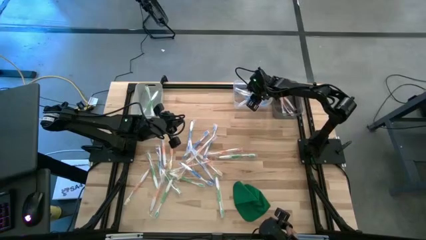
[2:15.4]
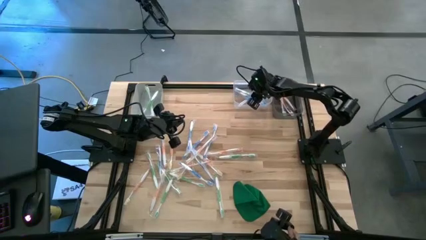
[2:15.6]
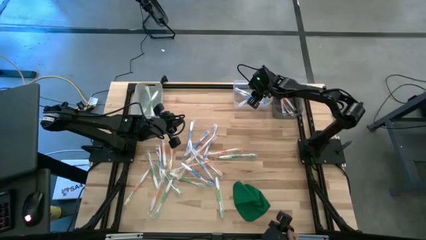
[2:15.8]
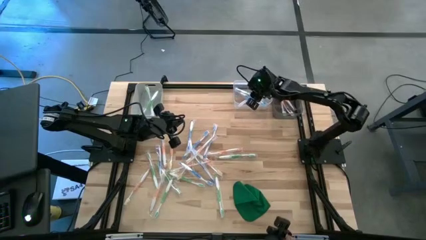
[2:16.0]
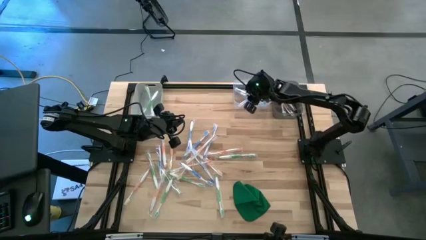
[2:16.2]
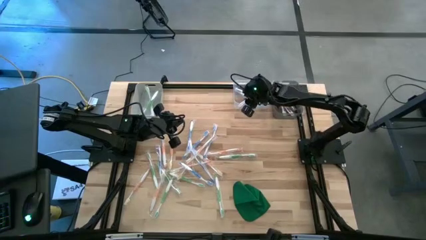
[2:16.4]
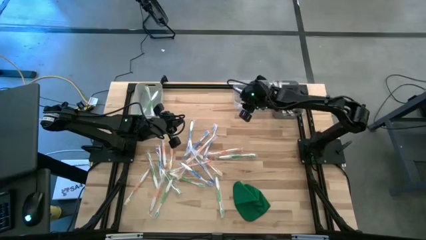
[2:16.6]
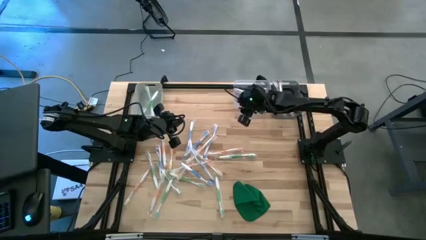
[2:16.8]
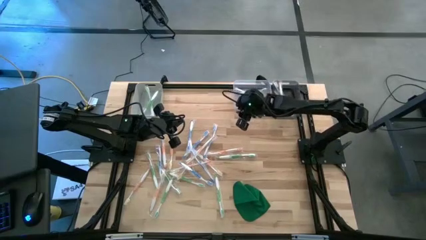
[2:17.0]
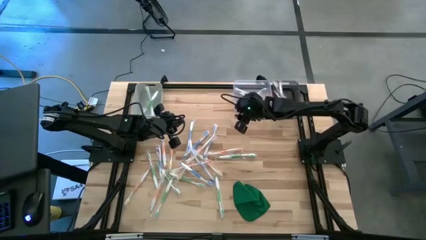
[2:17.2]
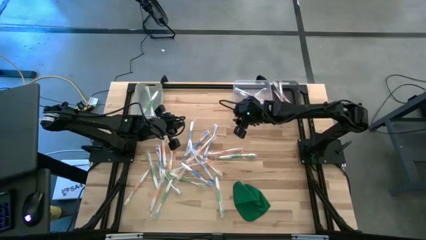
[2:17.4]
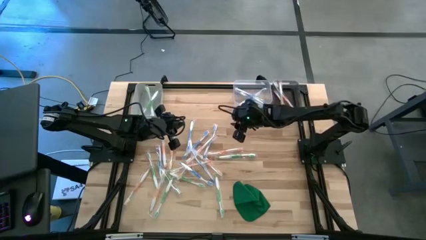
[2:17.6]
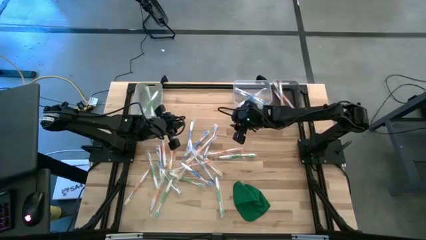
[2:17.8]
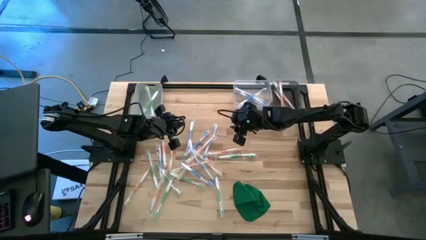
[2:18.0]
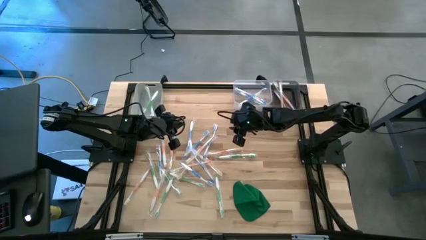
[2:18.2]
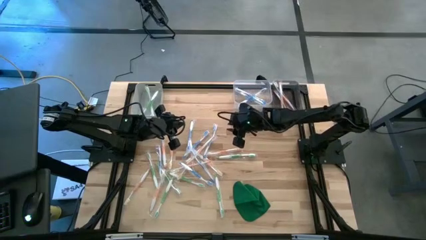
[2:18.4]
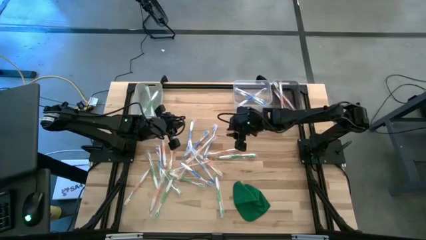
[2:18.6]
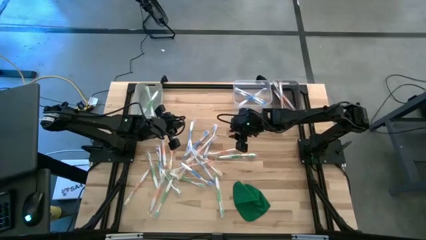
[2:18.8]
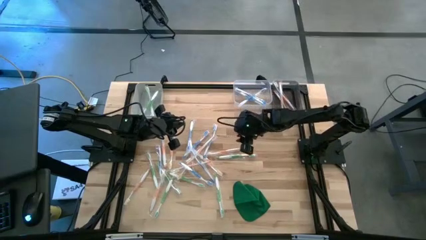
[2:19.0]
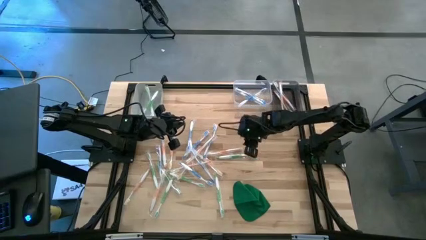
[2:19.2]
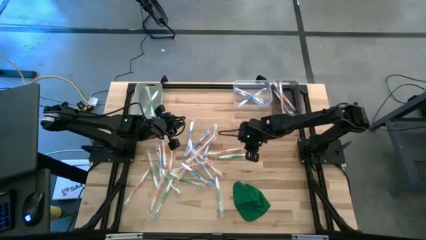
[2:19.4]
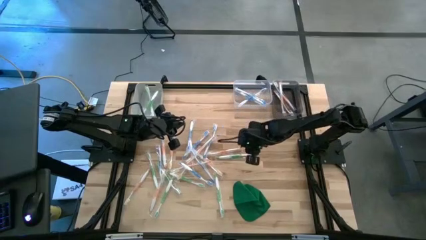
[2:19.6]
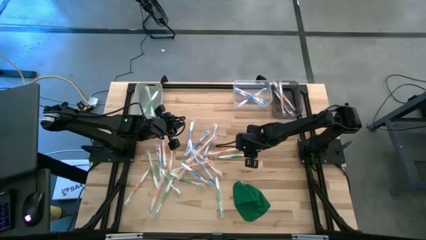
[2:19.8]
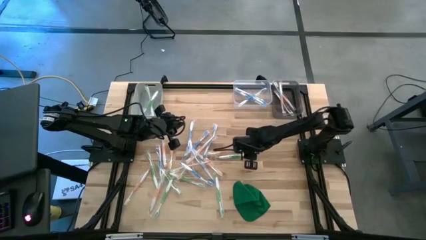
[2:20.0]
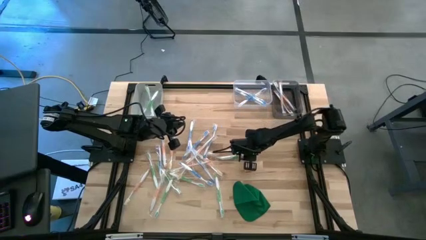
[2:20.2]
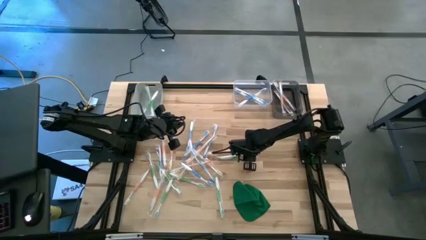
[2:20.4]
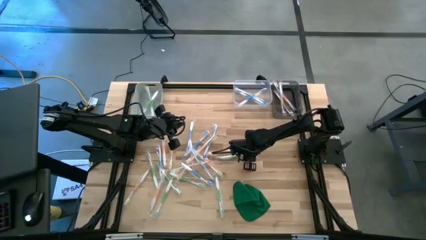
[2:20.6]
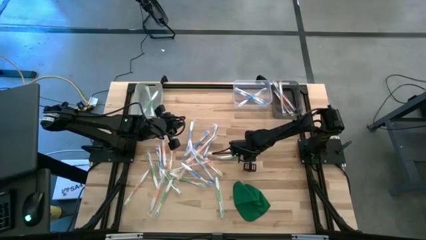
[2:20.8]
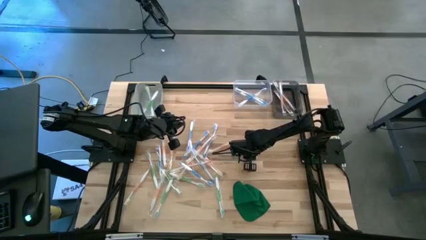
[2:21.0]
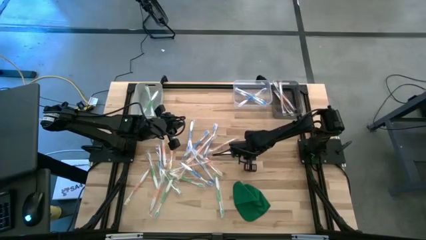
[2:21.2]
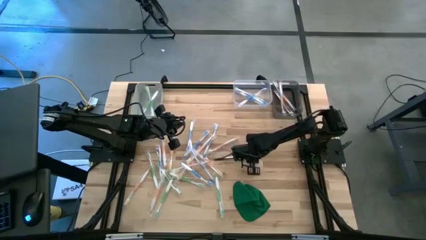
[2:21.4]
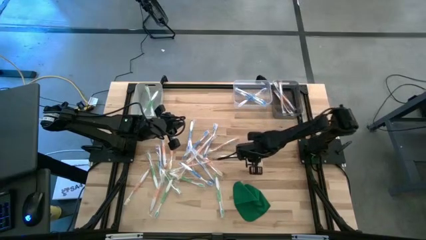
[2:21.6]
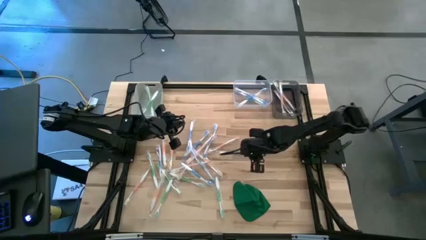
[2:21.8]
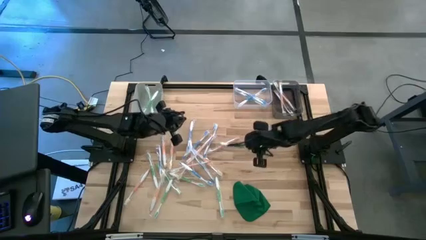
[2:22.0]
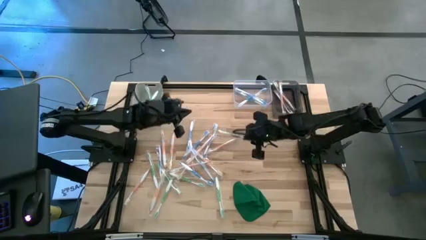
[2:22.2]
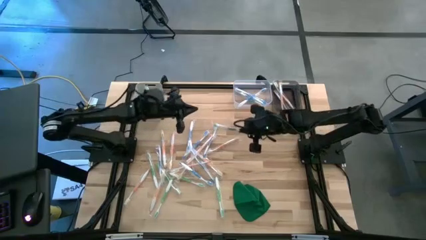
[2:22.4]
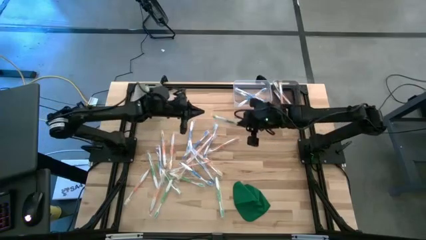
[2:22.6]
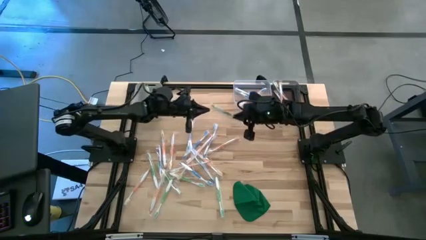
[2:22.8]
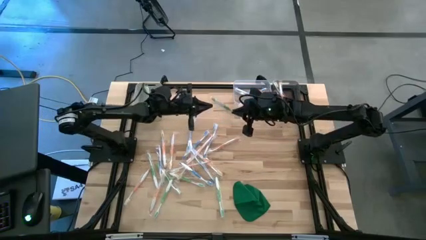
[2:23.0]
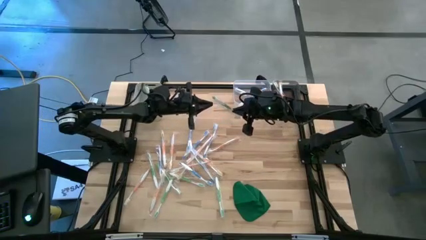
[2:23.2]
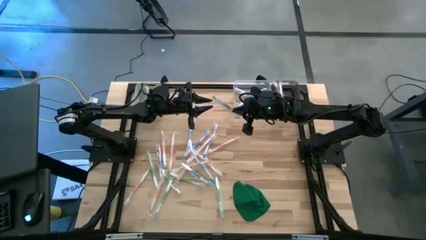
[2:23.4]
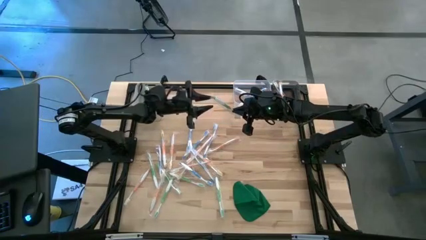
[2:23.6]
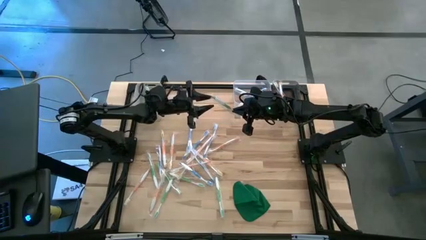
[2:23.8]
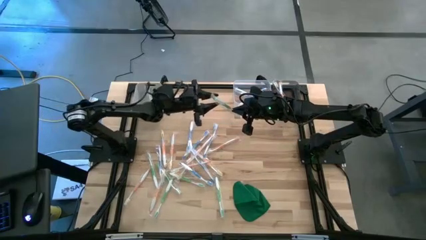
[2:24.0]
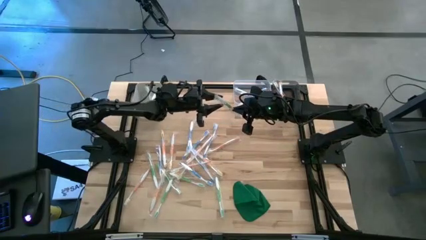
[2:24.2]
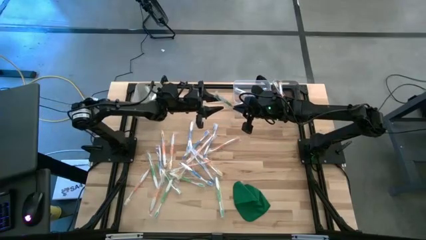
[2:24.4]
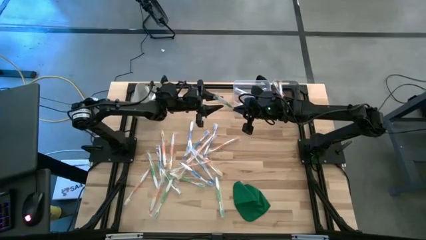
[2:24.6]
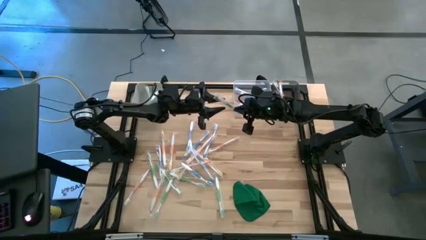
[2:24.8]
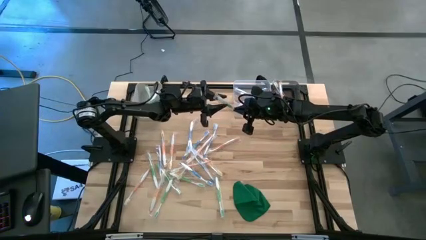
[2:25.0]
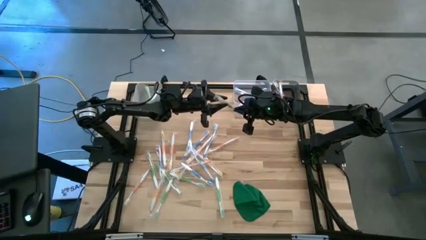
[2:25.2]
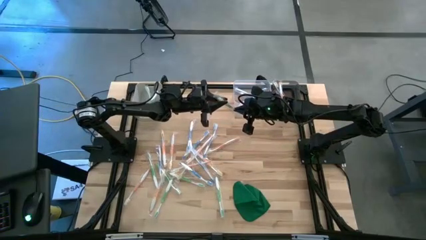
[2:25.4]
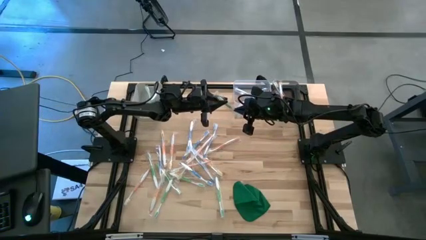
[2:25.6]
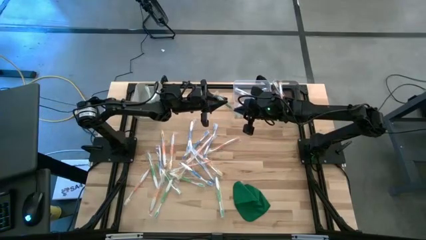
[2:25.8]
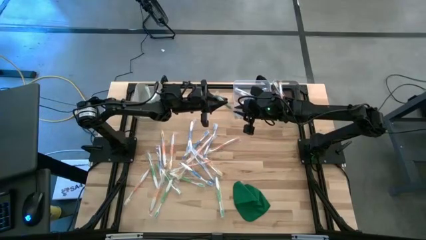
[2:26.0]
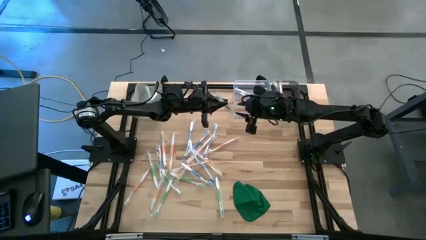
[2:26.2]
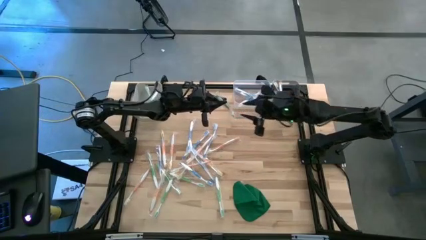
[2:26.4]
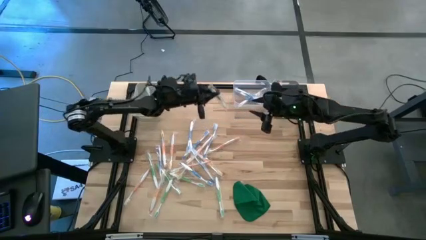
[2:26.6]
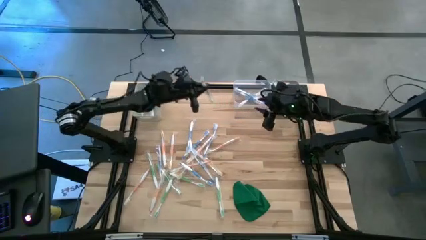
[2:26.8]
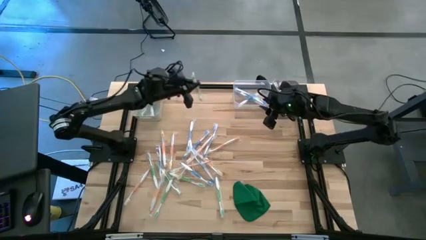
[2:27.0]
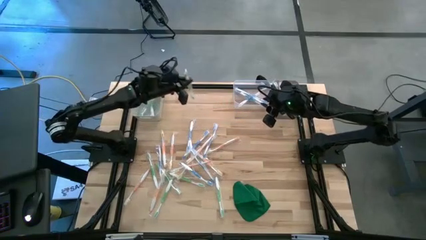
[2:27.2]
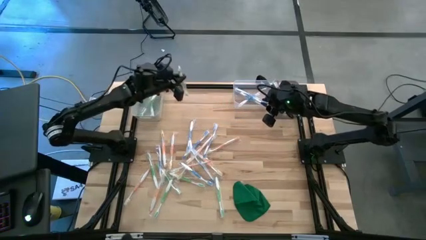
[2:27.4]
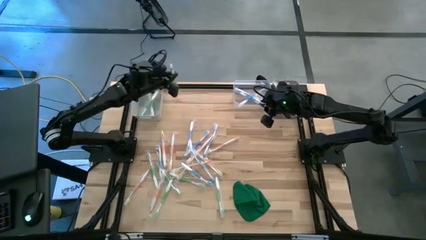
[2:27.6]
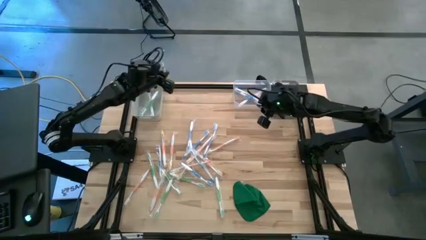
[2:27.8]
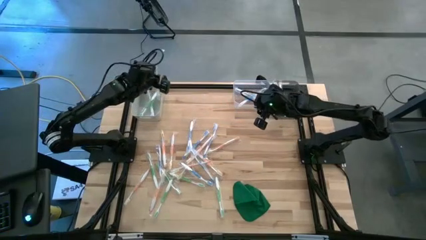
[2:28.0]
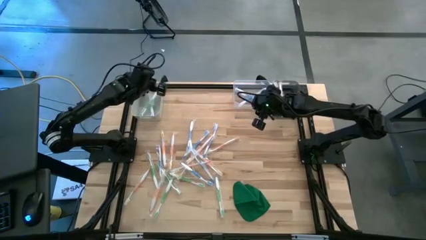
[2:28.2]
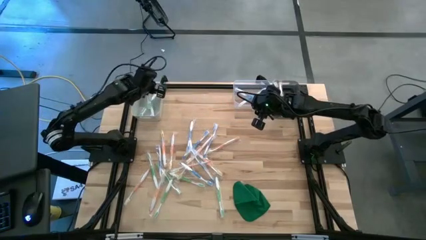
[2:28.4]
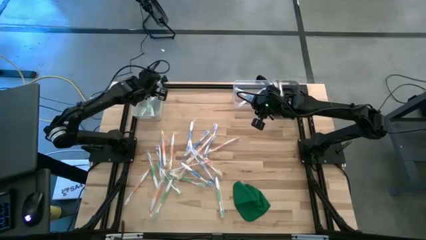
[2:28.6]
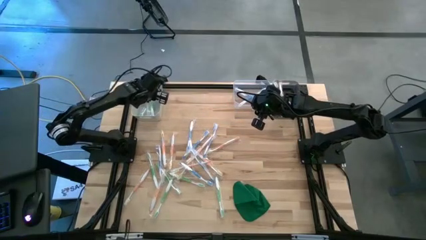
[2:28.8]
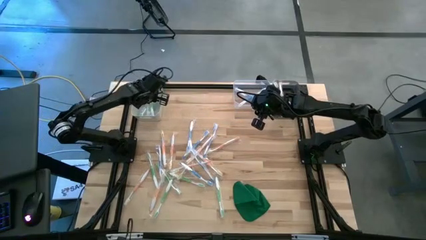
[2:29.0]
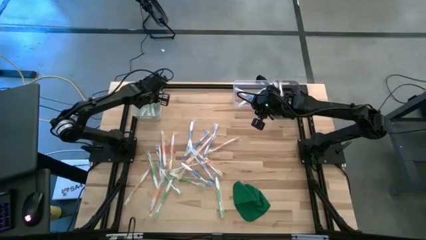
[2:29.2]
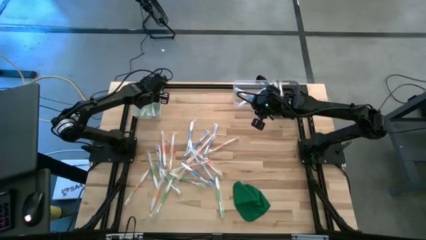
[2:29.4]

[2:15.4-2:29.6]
Task: Pick & Place Toothbrushes
Put the green toothbrush into the gray bin
